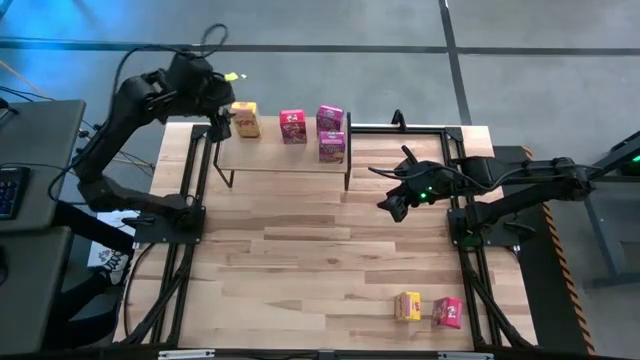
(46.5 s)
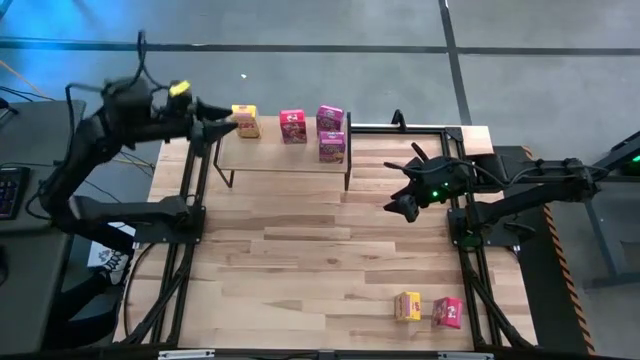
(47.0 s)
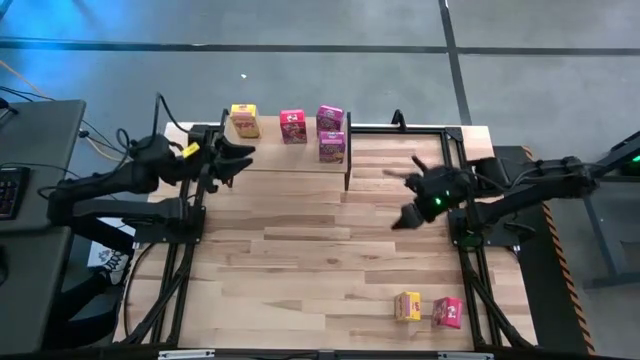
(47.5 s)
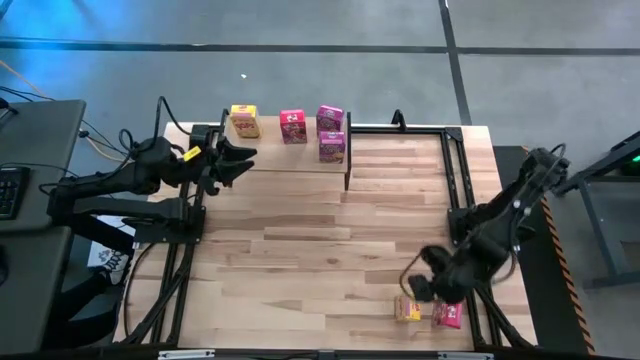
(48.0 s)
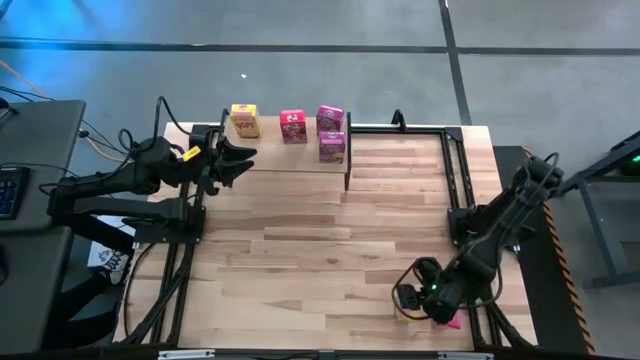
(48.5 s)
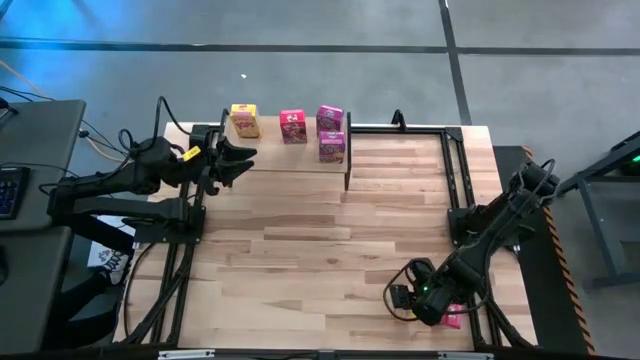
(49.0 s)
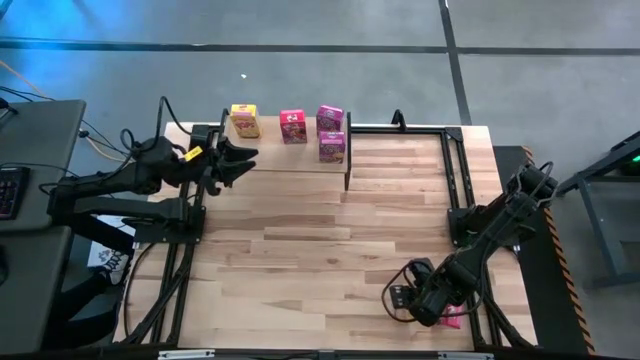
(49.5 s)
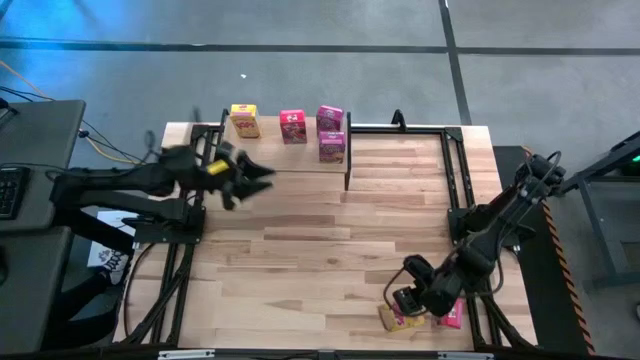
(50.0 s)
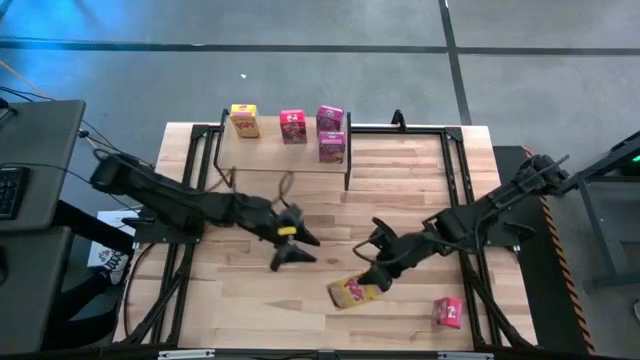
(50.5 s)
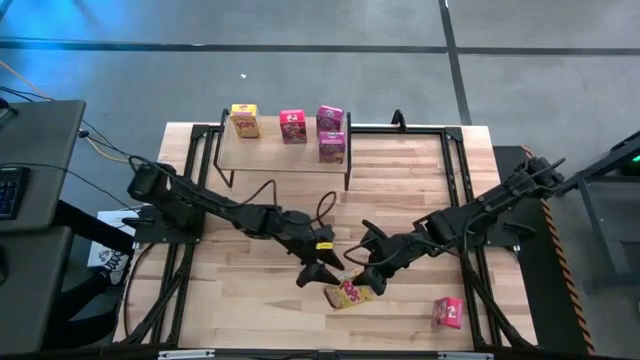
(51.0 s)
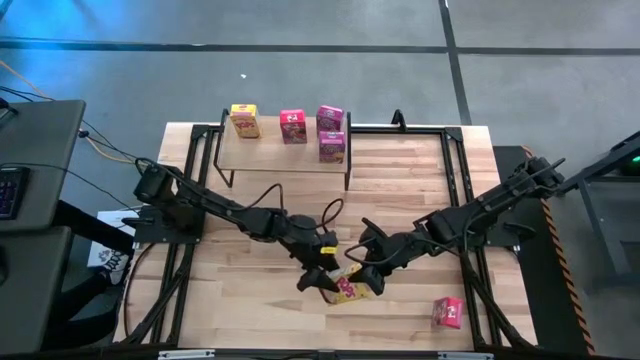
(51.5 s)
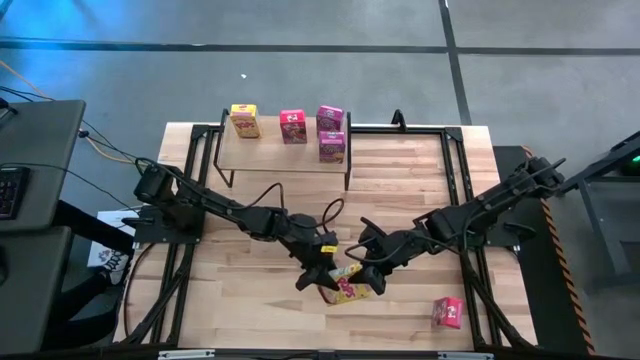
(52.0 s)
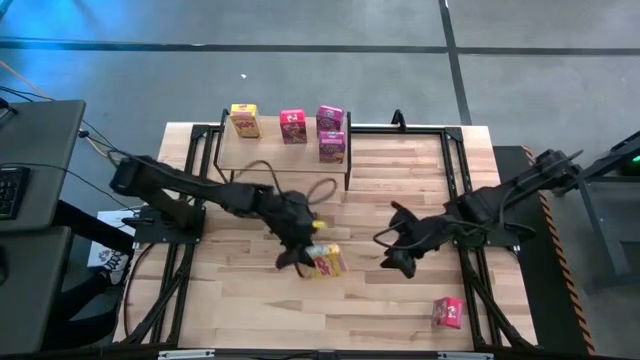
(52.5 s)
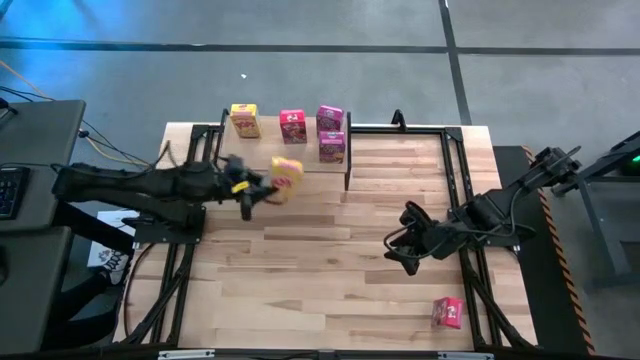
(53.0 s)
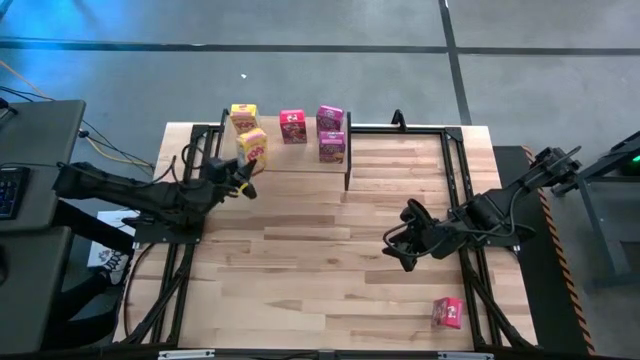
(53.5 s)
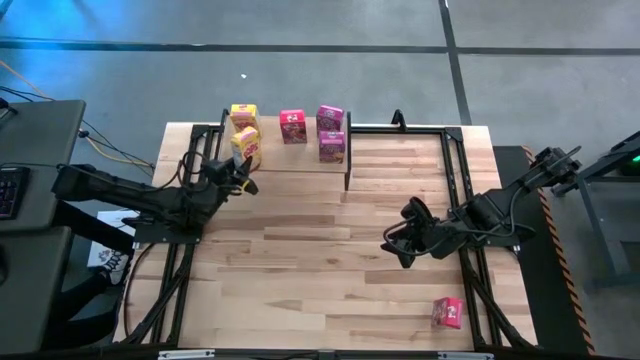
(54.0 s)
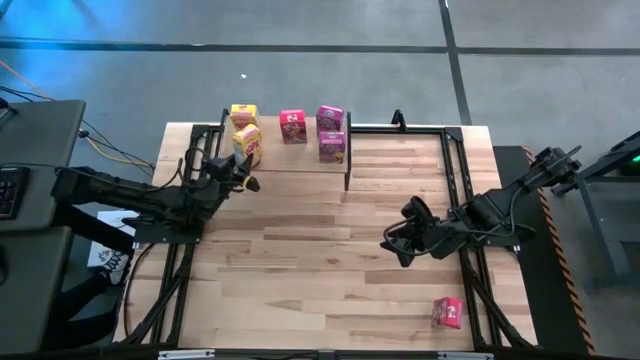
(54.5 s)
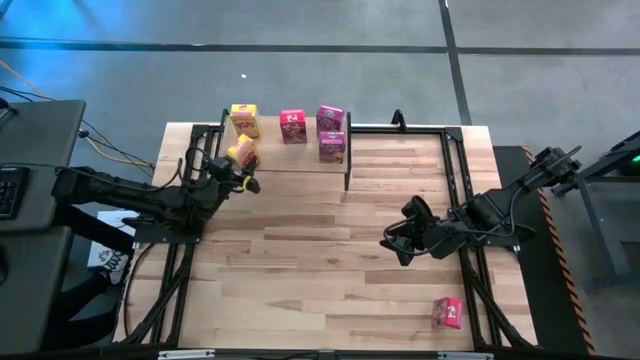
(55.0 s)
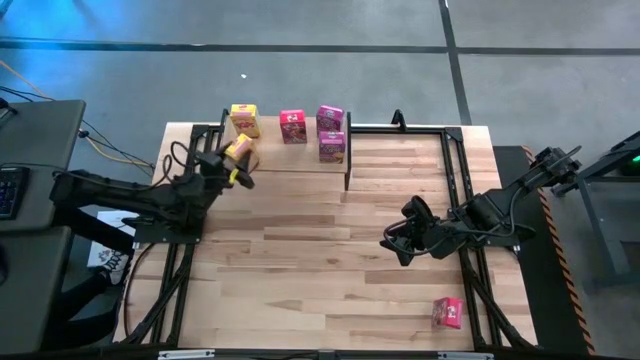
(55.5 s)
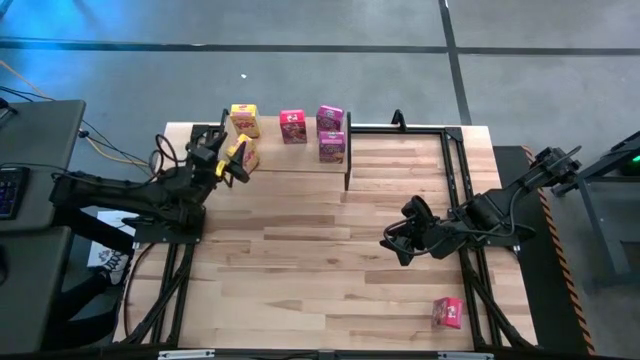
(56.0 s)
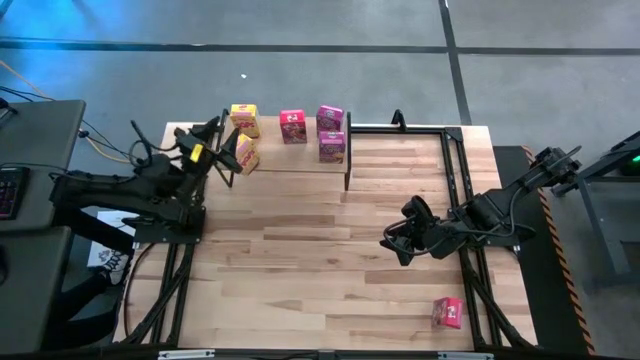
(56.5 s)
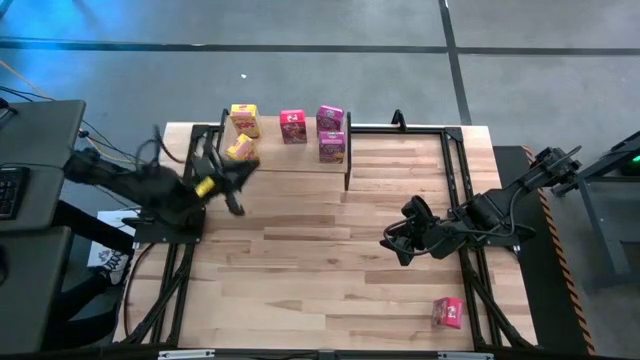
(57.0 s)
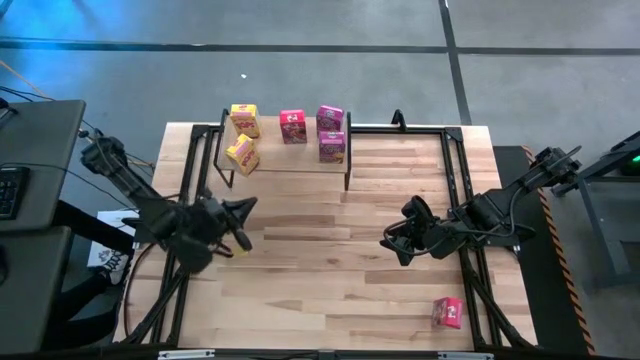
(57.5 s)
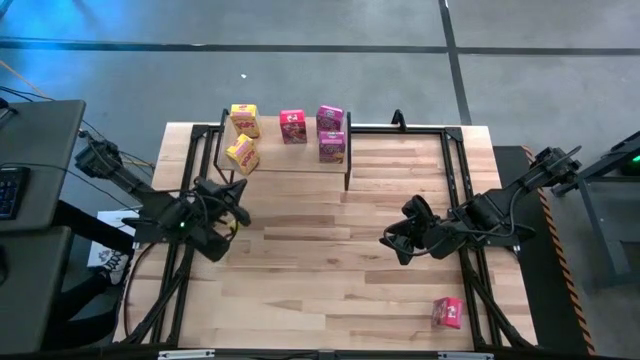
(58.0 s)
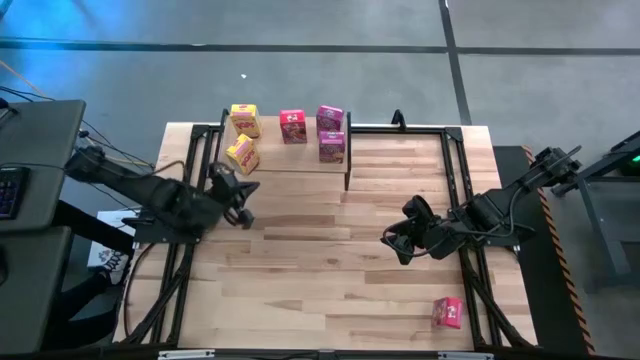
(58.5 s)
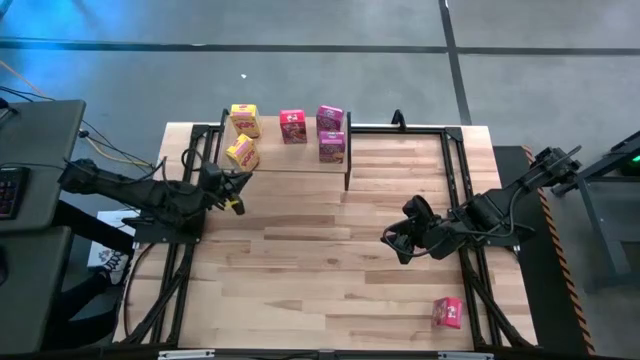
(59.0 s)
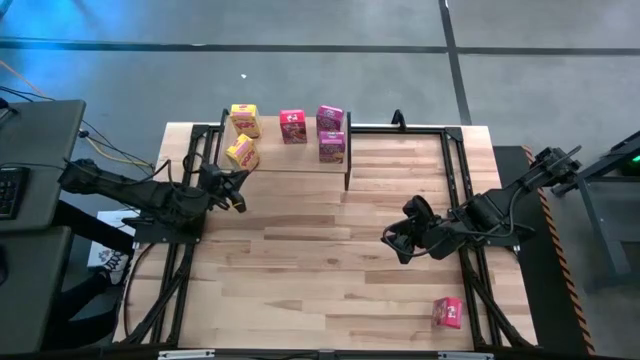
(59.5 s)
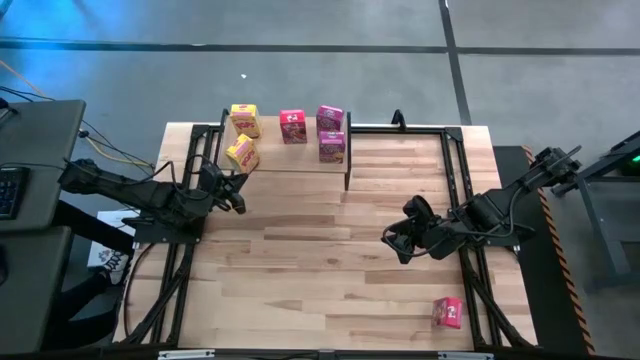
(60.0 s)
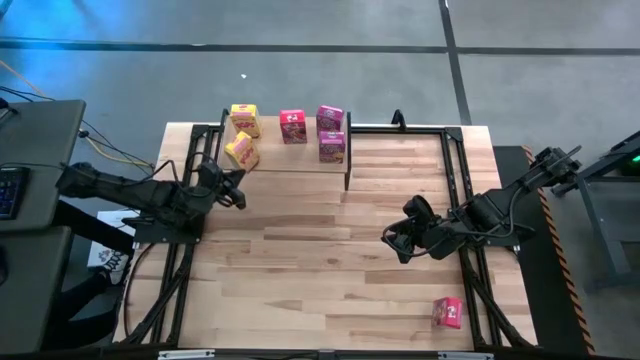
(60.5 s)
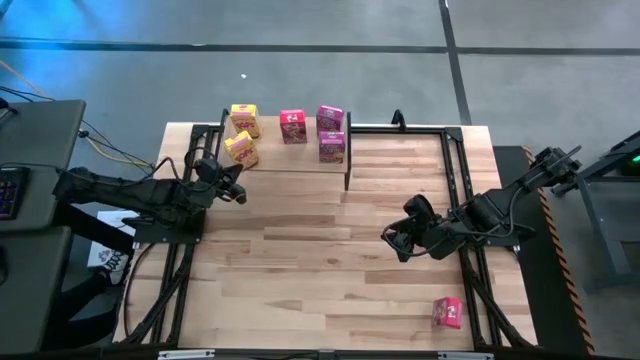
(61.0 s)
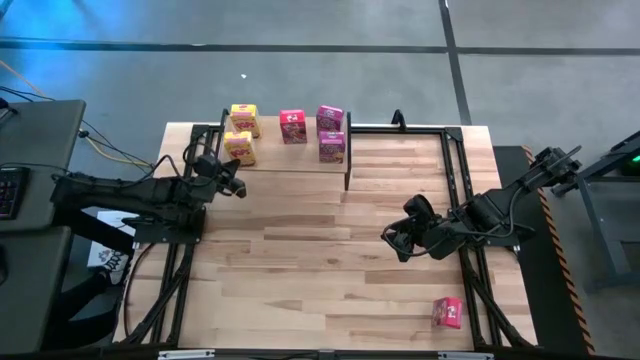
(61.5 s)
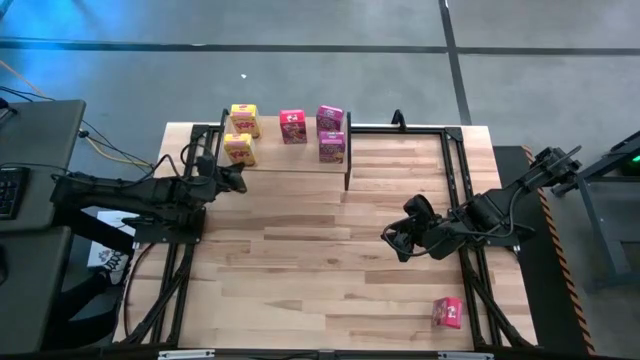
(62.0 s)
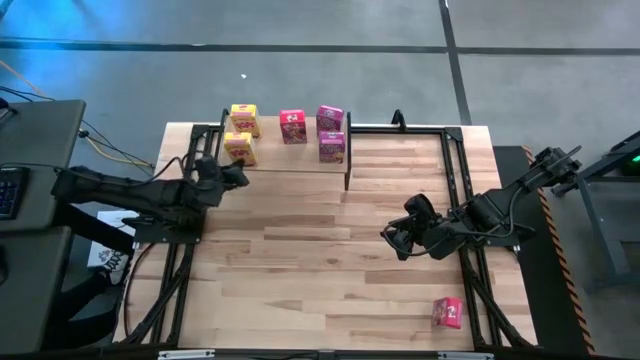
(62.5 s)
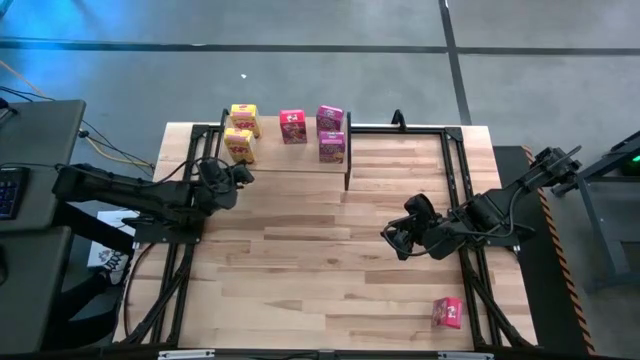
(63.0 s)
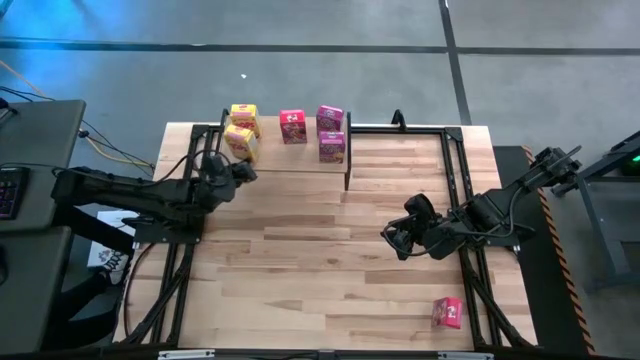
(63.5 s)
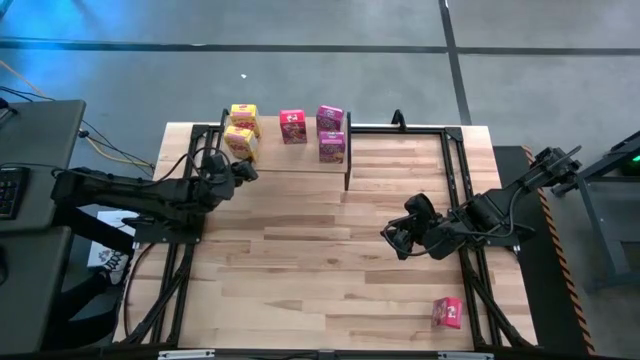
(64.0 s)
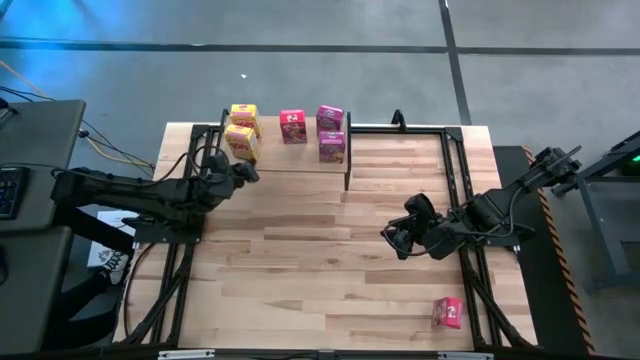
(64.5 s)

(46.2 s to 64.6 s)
Task: Stack cereal on shelf
Put the yellow cereal box on the shelf aligned with the other yellow cereal box

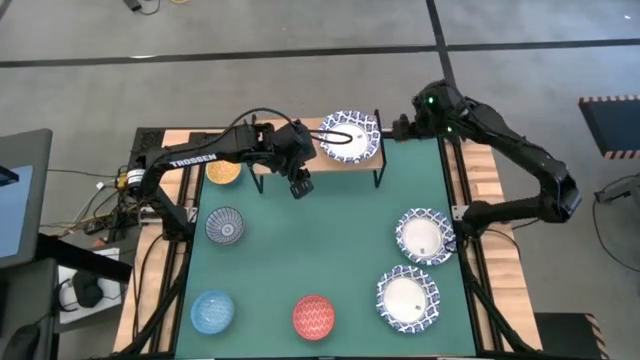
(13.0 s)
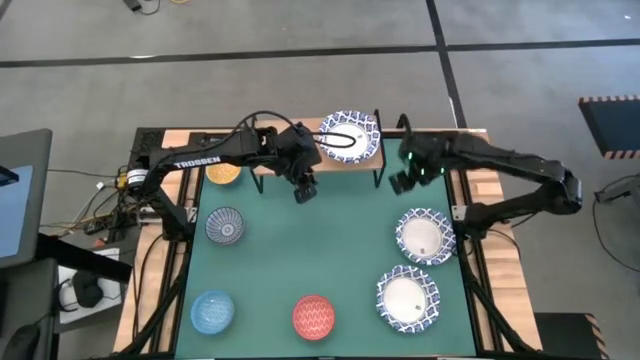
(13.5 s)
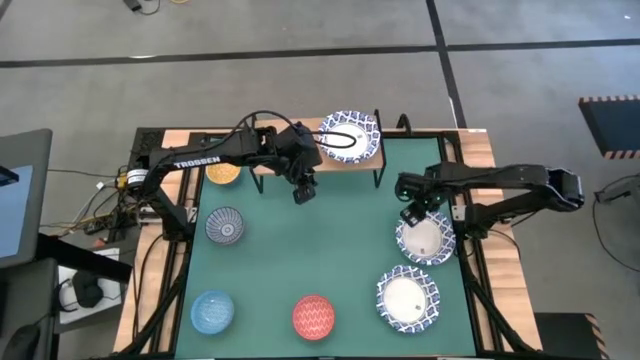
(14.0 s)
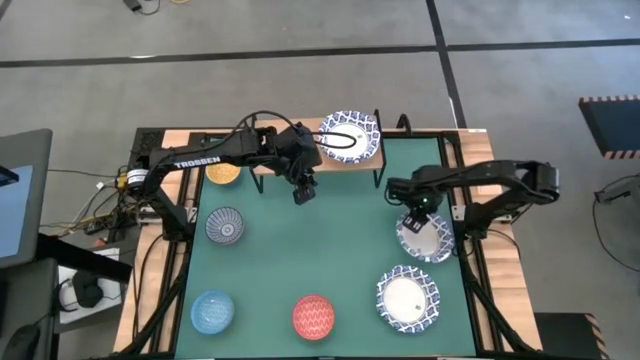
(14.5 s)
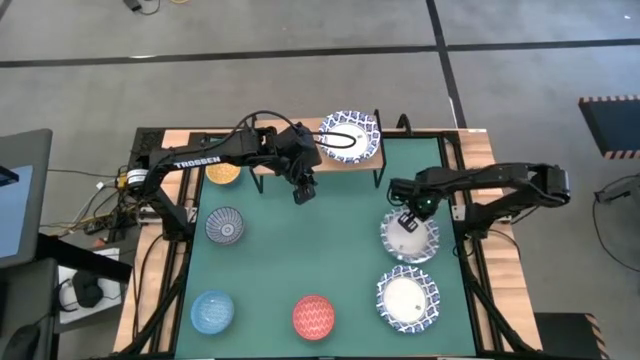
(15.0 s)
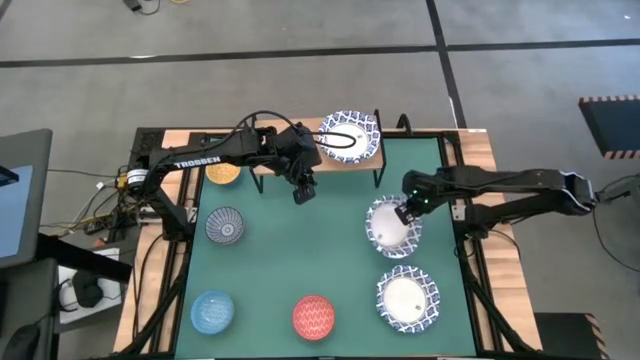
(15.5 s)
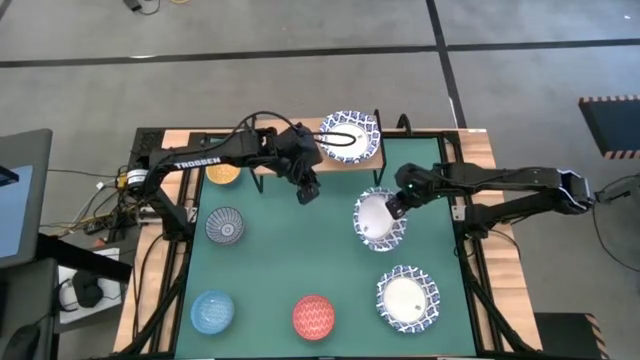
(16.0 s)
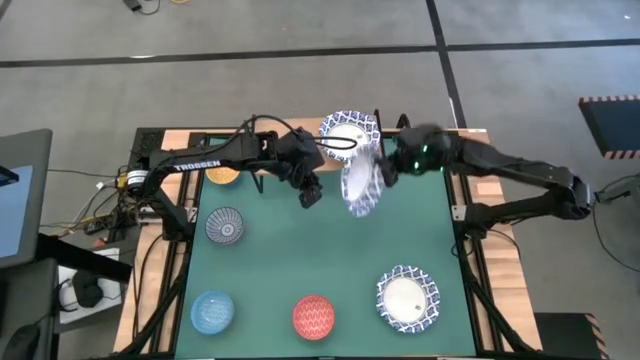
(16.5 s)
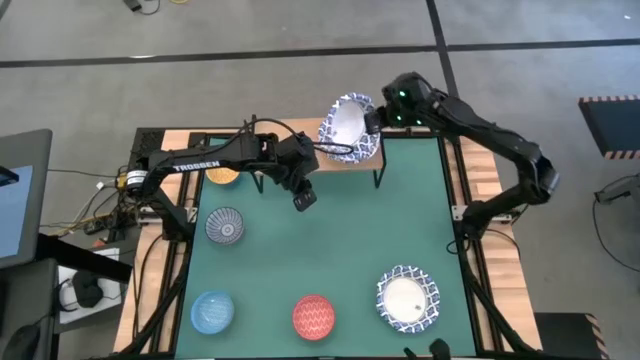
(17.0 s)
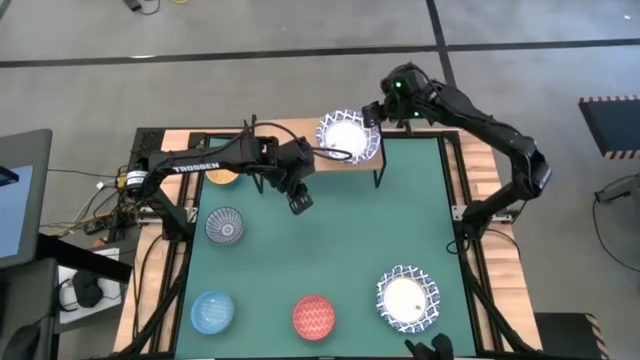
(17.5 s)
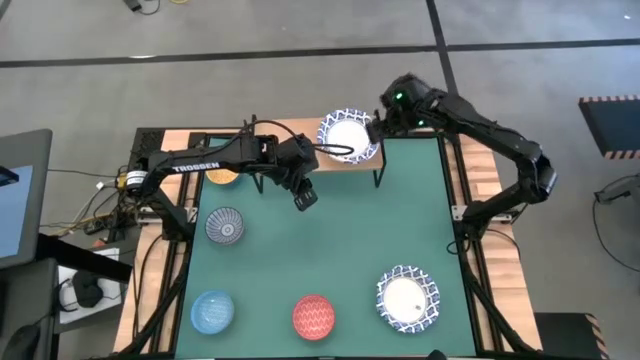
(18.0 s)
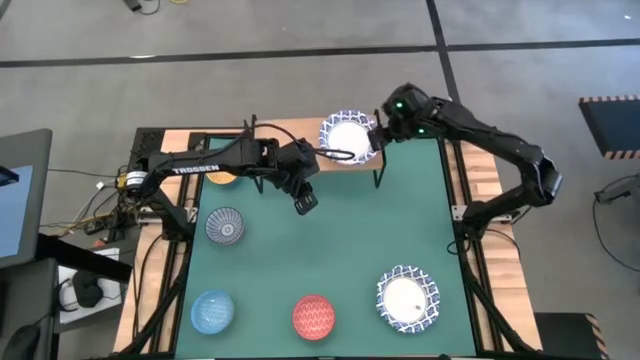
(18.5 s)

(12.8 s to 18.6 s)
Task: Place and stack bowls onto a shelf
Stack the top white bowl on top of the other white bowl on the shelf
